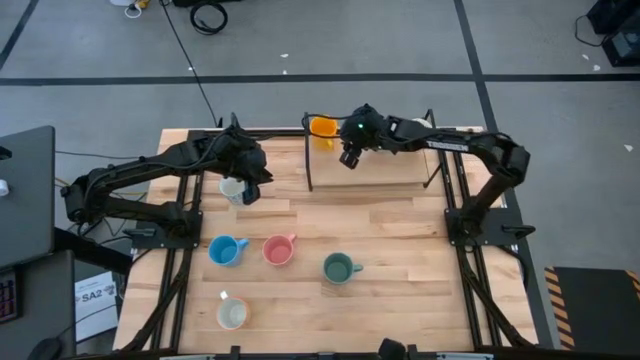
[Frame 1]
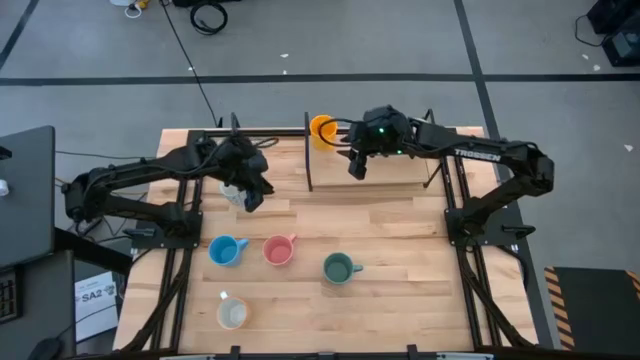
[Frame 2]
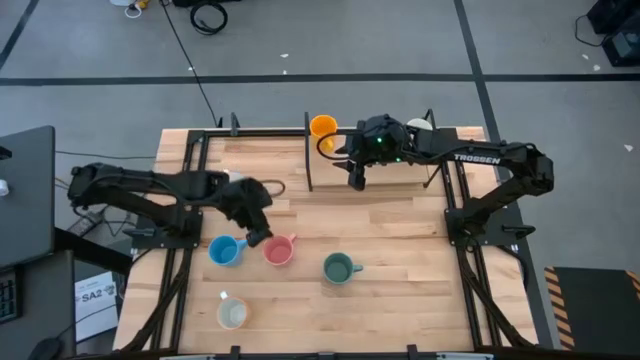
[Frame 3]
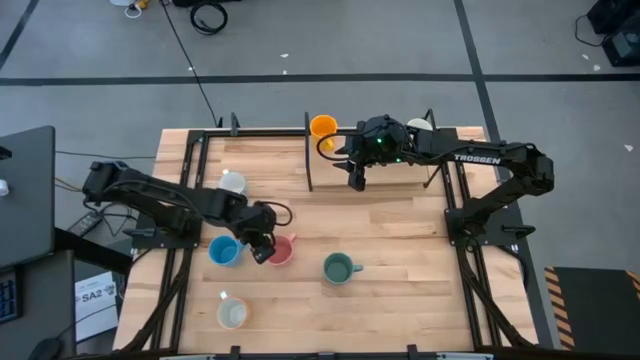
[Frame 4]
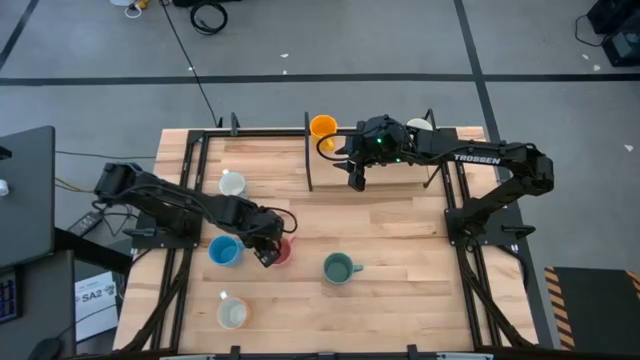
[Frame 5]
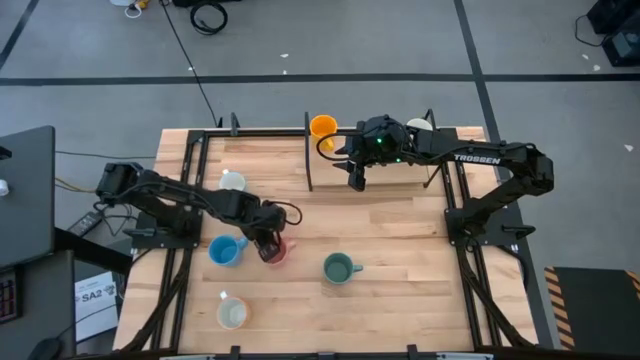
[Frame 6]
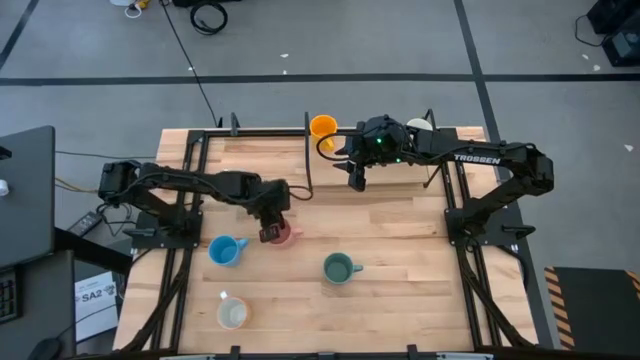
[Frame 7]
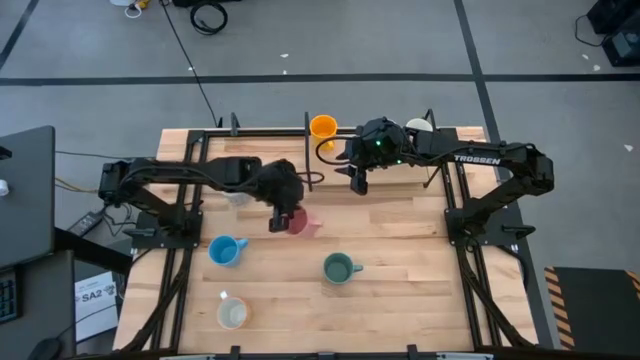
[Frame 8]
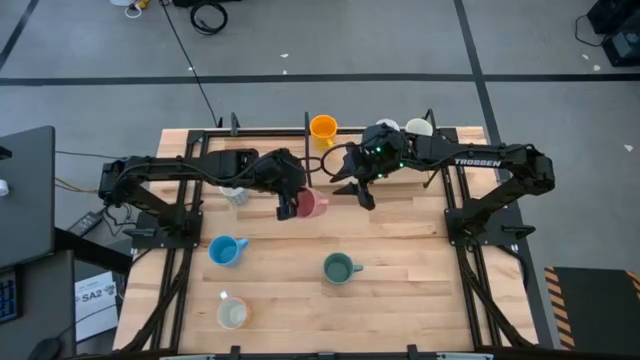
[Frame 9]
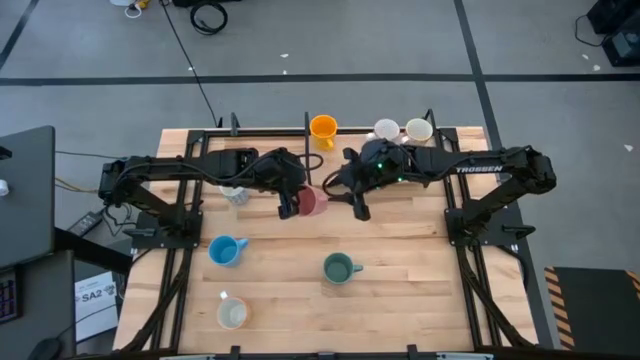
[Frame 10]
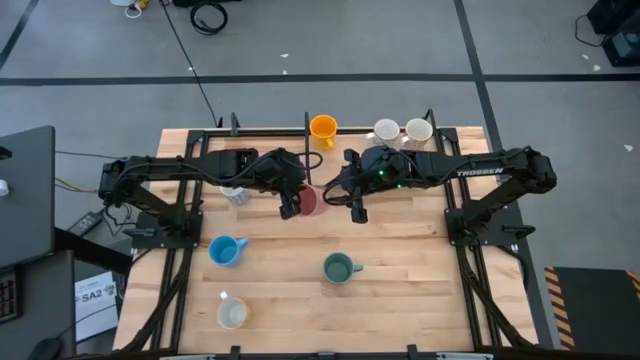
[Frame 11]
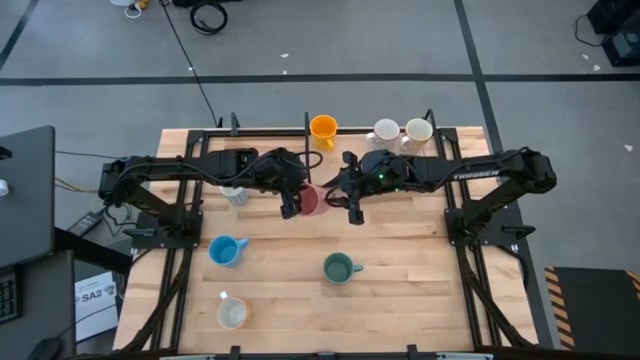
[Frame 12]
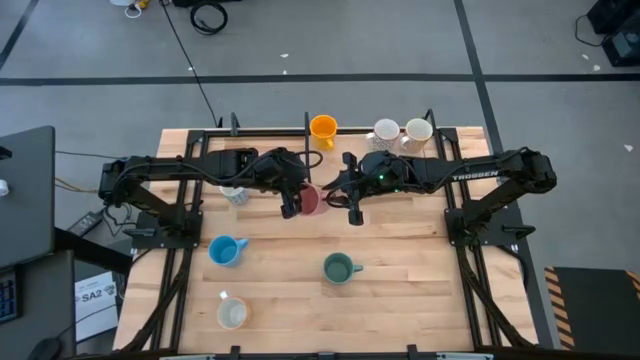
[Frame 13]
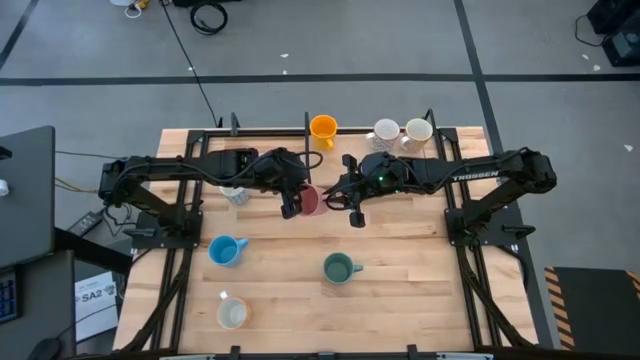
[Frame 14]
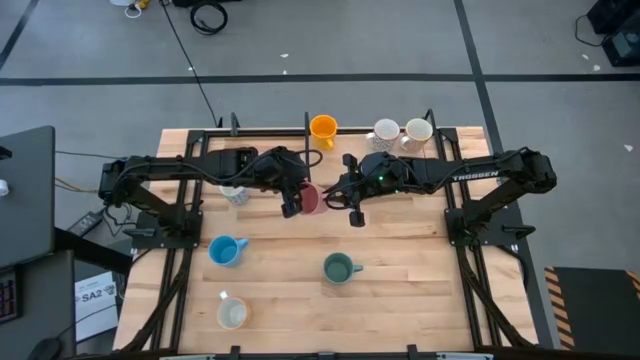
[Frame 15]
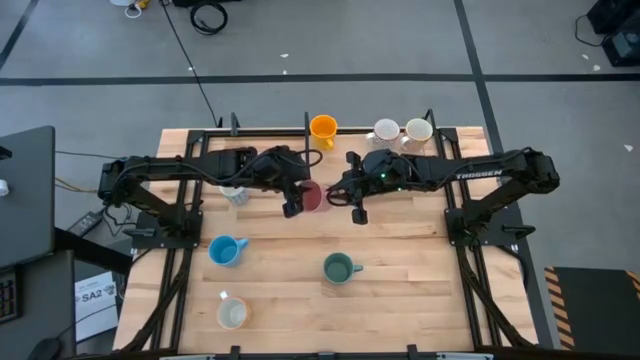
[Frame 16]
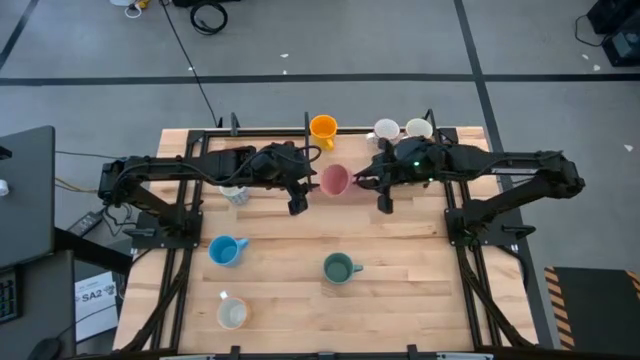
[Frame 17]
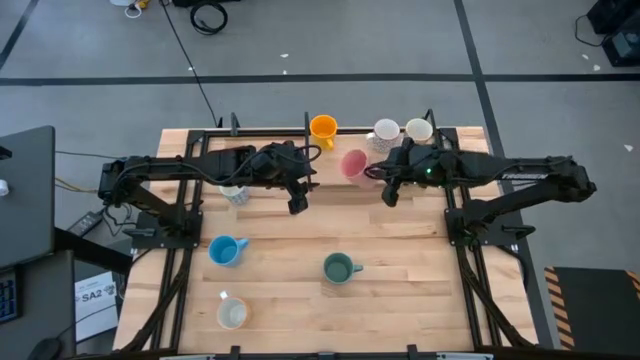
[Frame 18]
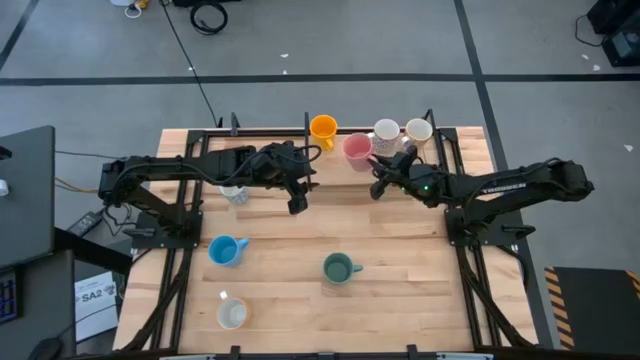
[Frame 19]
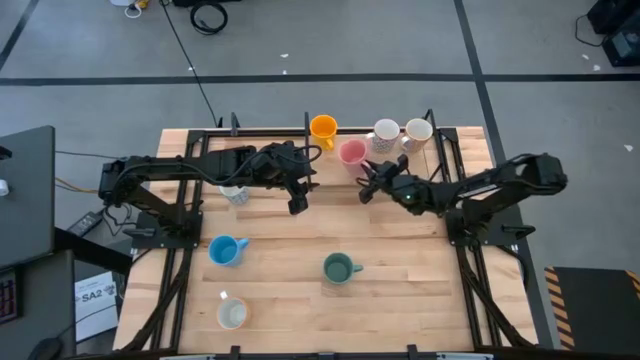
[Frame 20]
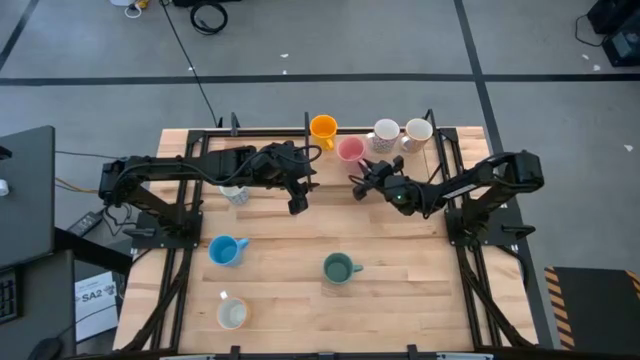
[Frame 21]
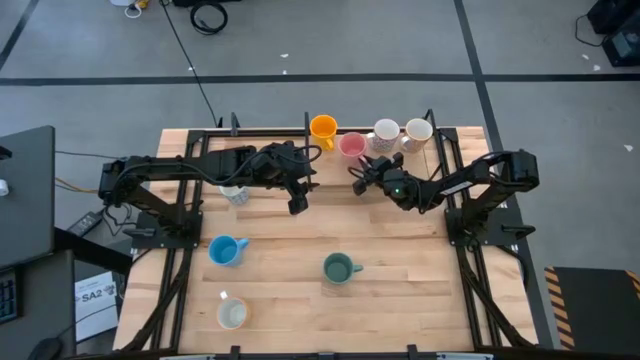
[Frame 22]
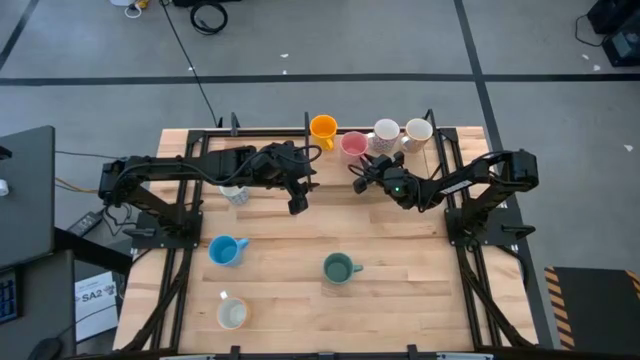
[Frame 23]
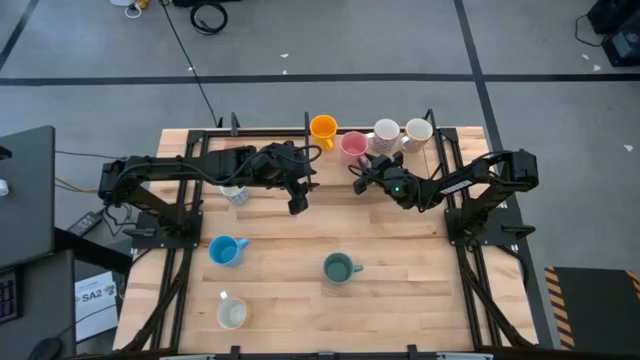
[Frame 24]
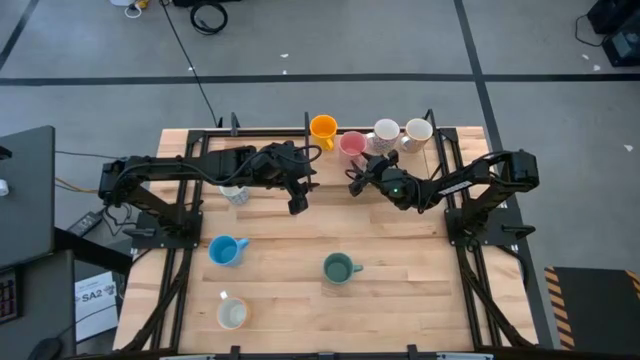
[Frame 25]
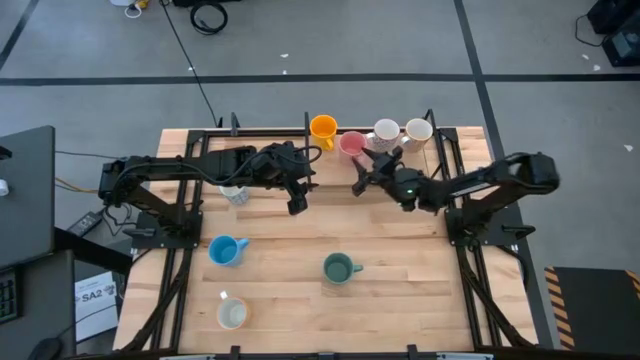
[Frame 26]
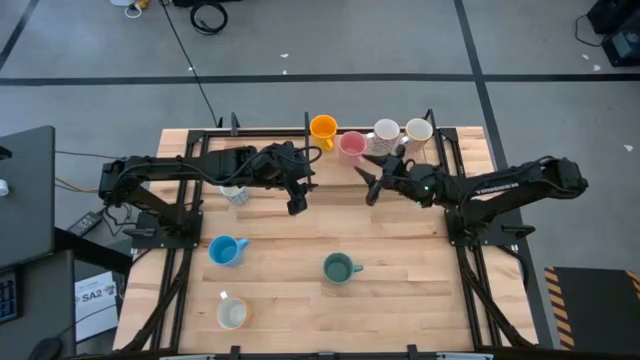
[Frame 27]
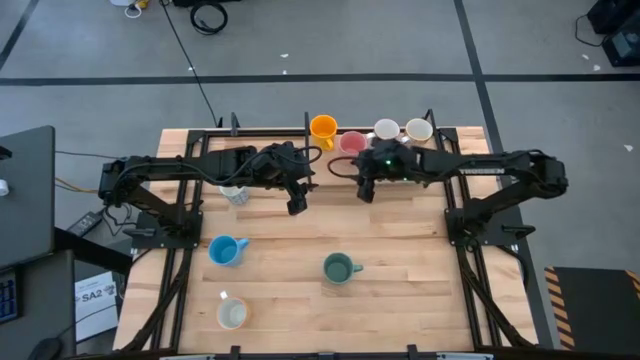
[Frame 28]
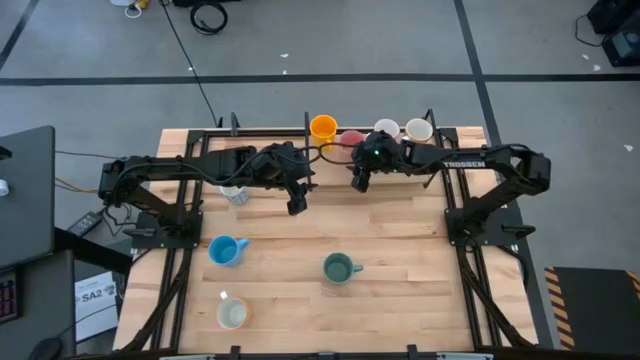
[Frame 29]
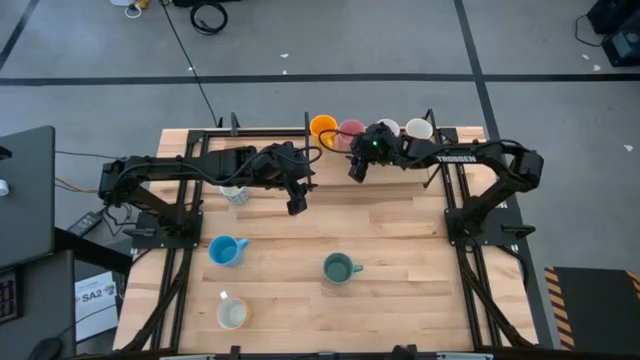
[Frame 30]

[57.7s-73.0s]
Task: Place coffee mugs
Put the pink mug on the shelf
